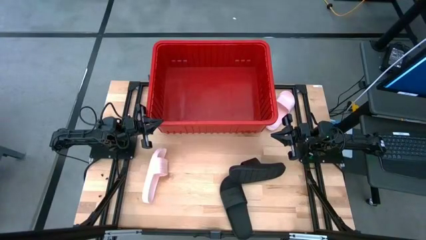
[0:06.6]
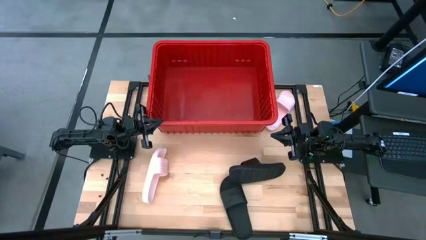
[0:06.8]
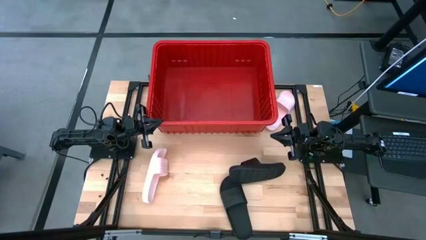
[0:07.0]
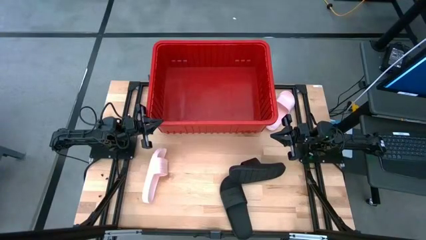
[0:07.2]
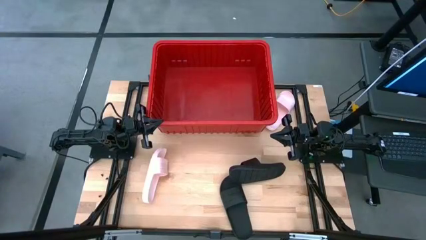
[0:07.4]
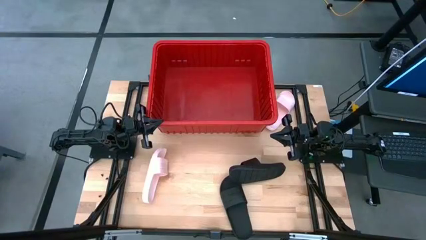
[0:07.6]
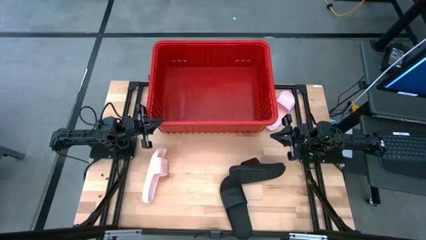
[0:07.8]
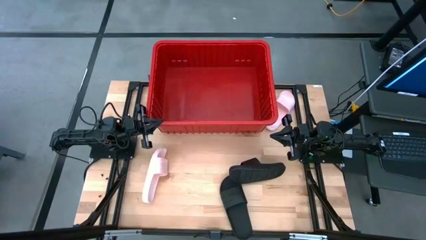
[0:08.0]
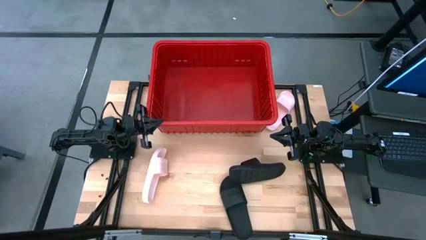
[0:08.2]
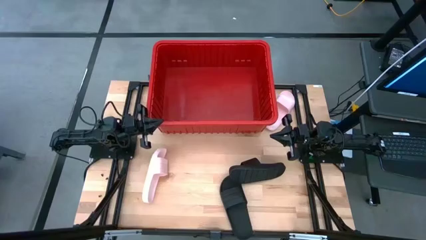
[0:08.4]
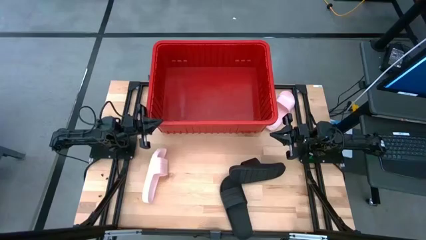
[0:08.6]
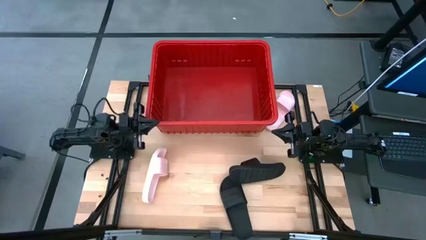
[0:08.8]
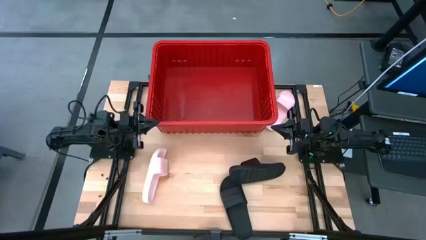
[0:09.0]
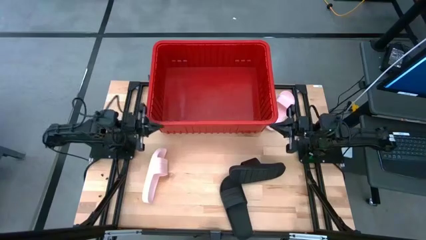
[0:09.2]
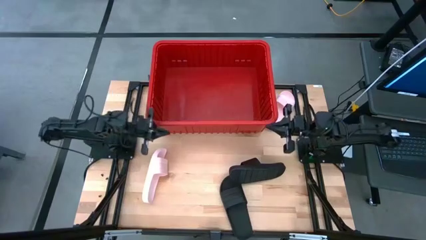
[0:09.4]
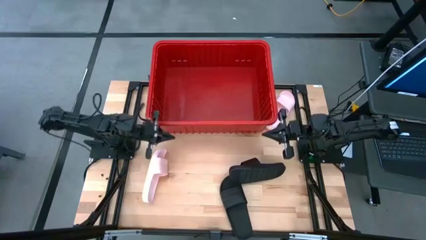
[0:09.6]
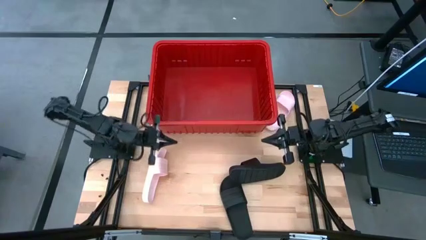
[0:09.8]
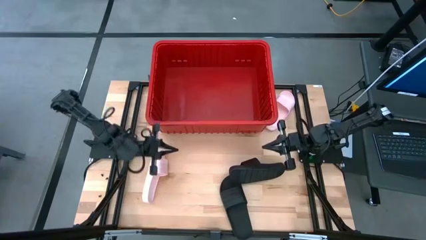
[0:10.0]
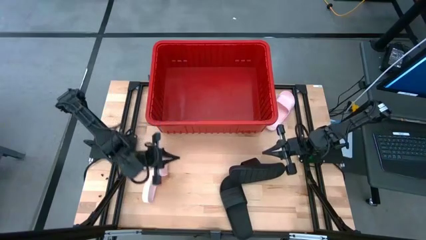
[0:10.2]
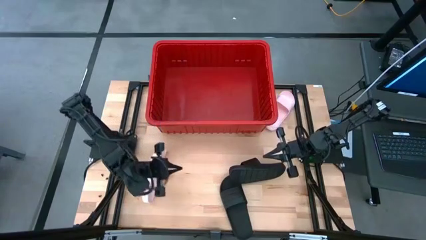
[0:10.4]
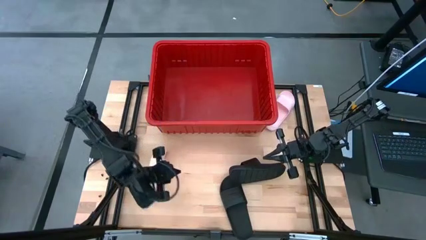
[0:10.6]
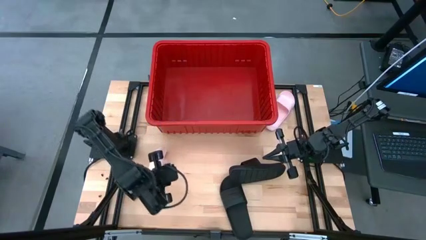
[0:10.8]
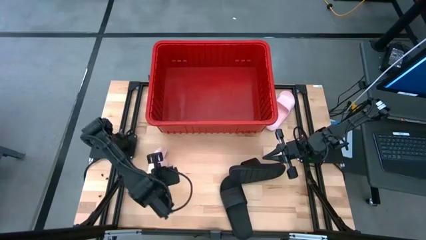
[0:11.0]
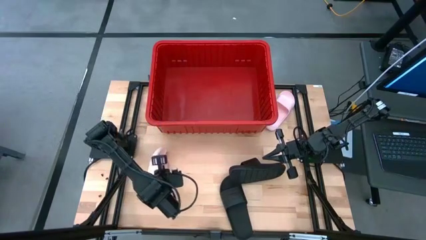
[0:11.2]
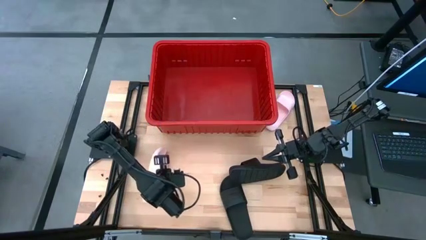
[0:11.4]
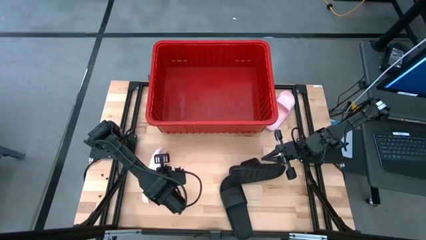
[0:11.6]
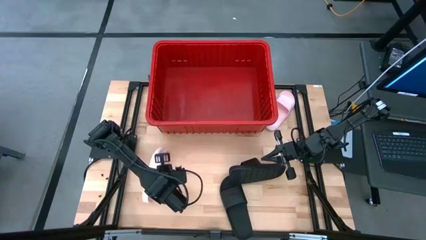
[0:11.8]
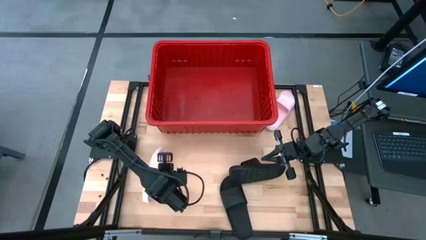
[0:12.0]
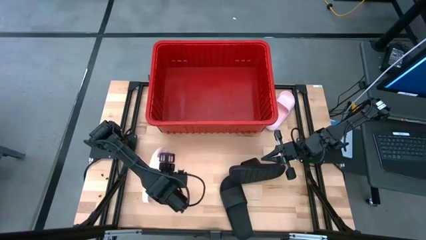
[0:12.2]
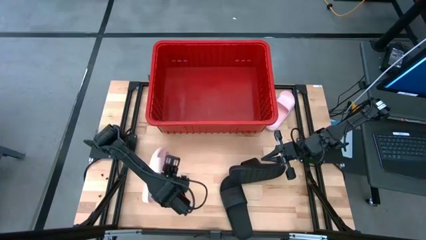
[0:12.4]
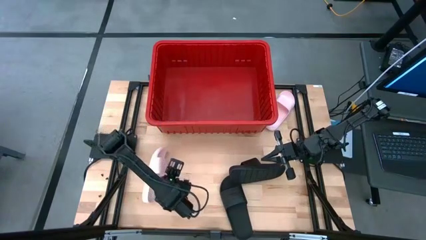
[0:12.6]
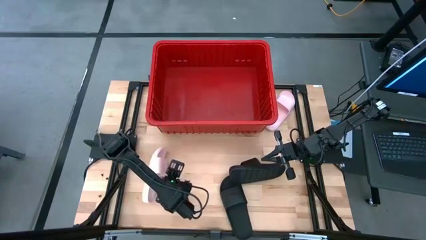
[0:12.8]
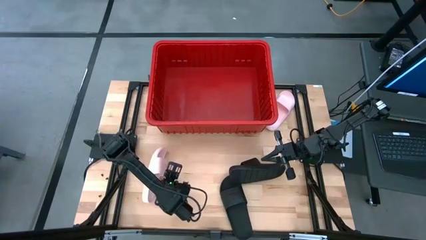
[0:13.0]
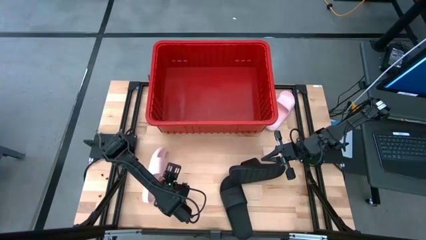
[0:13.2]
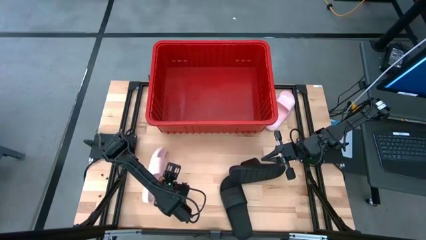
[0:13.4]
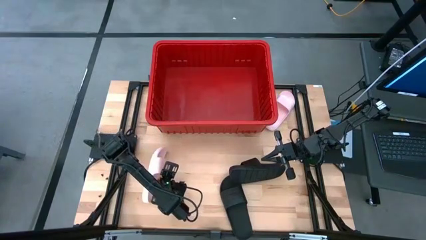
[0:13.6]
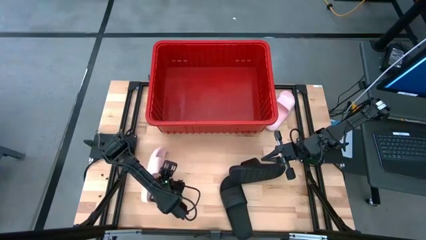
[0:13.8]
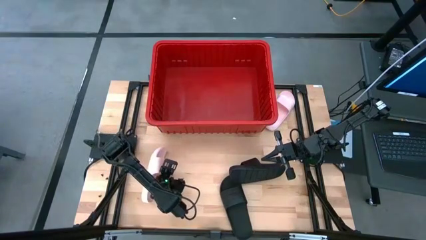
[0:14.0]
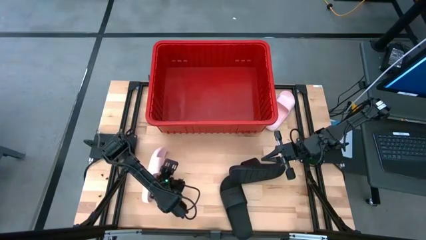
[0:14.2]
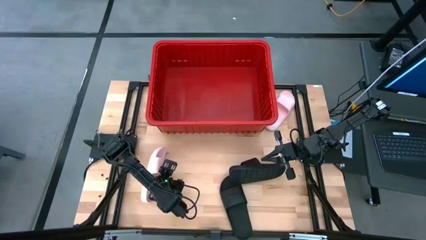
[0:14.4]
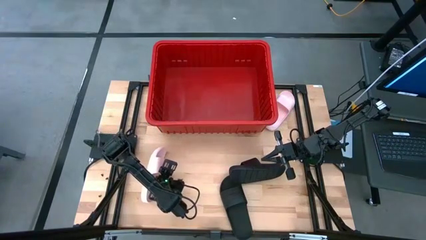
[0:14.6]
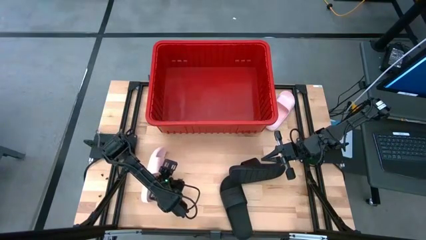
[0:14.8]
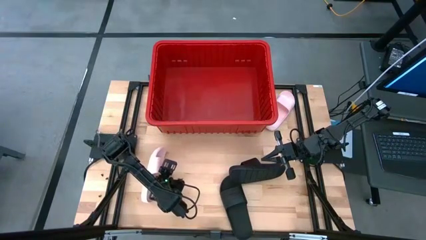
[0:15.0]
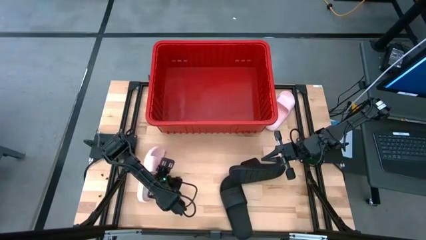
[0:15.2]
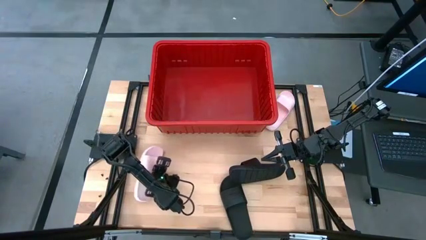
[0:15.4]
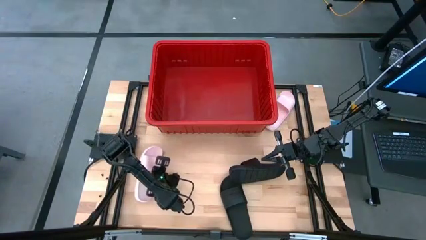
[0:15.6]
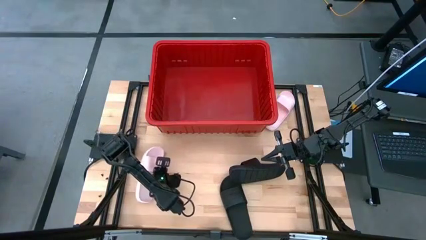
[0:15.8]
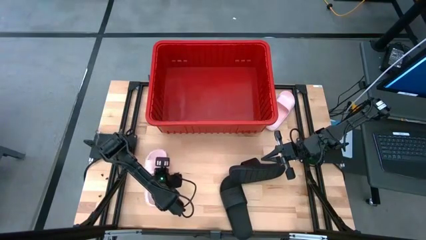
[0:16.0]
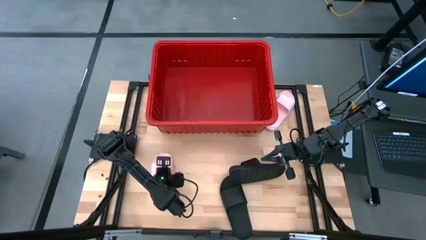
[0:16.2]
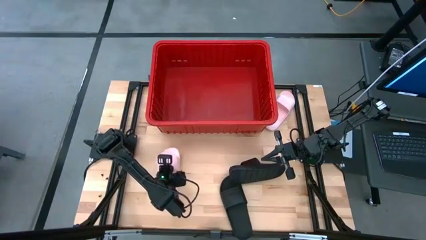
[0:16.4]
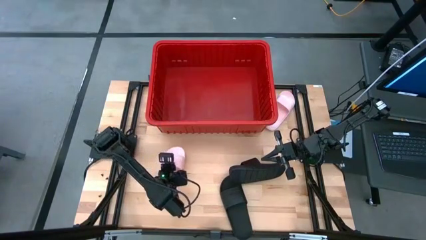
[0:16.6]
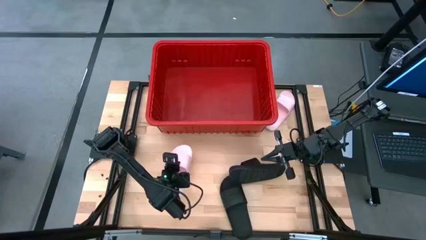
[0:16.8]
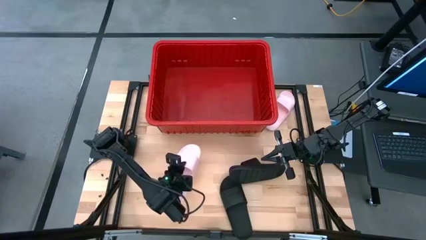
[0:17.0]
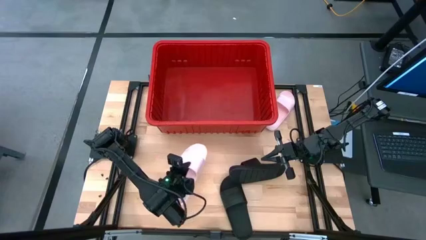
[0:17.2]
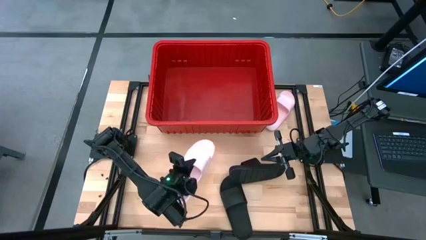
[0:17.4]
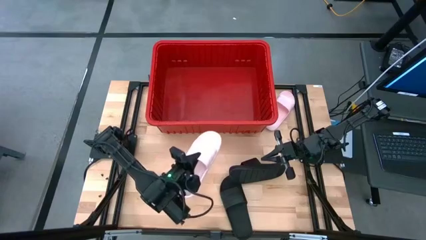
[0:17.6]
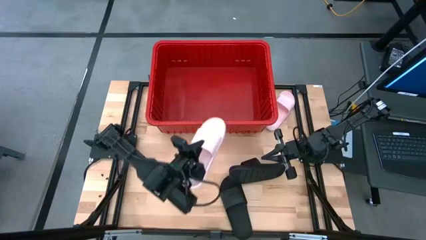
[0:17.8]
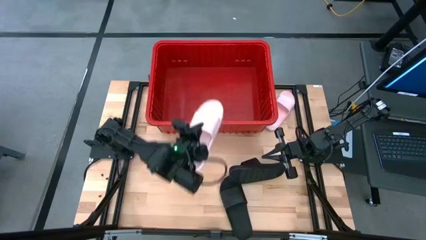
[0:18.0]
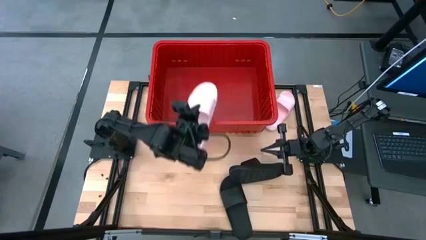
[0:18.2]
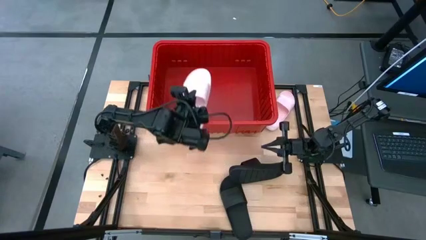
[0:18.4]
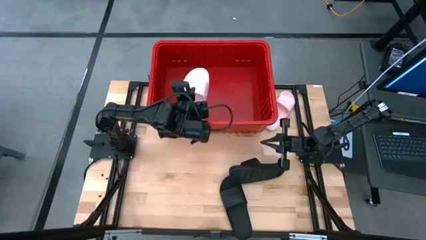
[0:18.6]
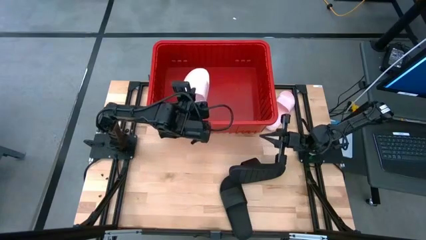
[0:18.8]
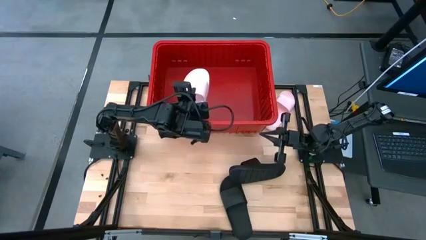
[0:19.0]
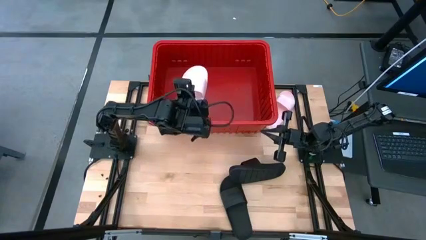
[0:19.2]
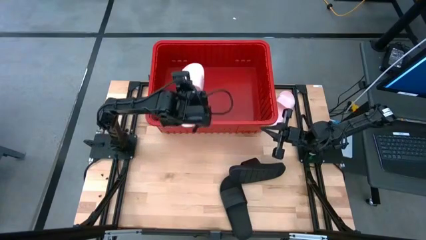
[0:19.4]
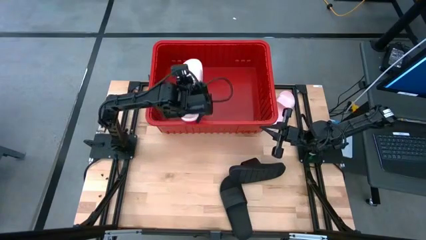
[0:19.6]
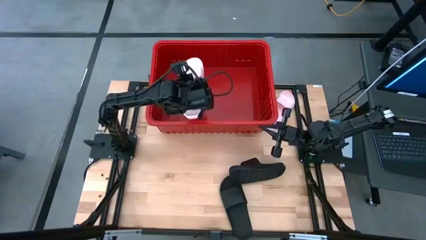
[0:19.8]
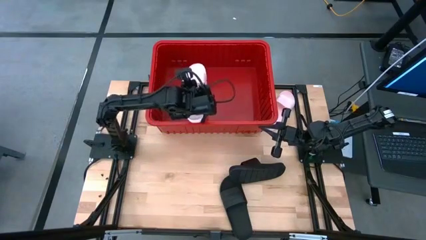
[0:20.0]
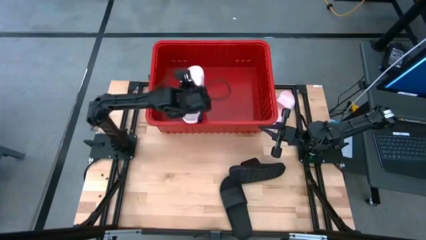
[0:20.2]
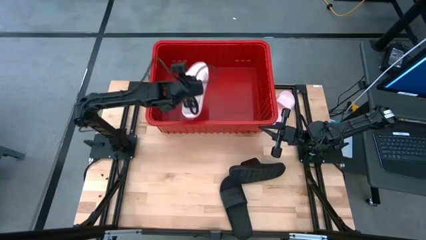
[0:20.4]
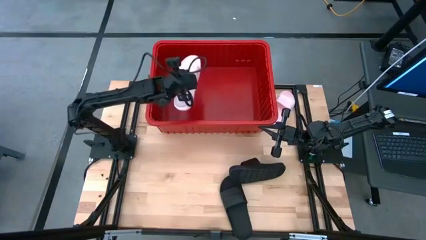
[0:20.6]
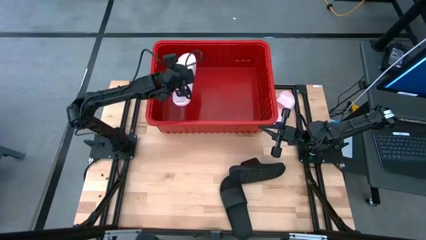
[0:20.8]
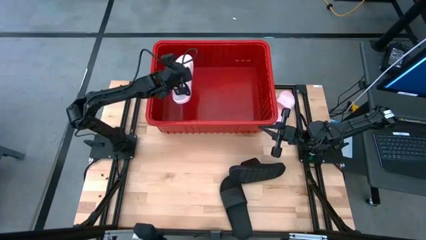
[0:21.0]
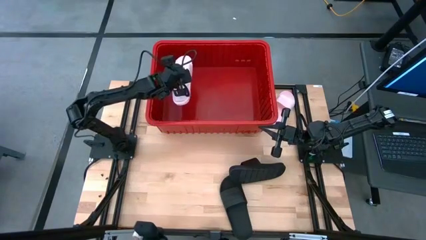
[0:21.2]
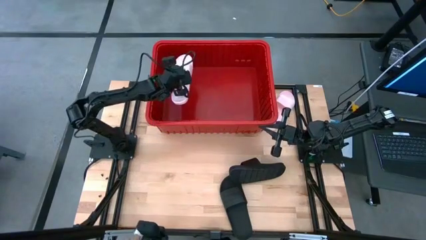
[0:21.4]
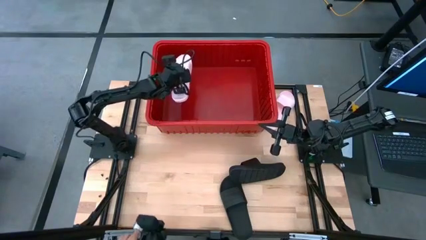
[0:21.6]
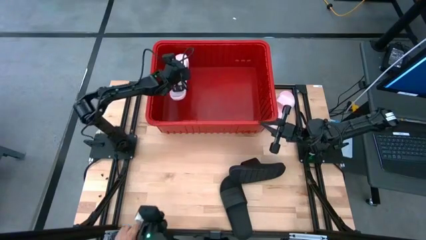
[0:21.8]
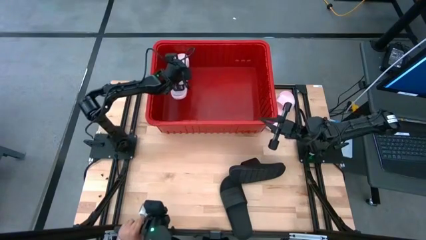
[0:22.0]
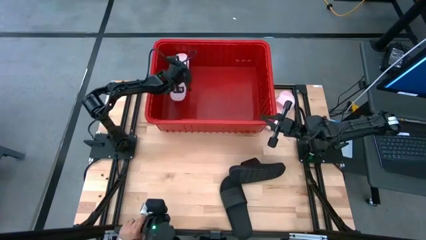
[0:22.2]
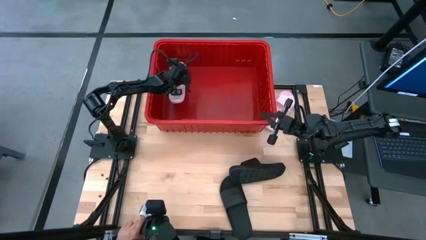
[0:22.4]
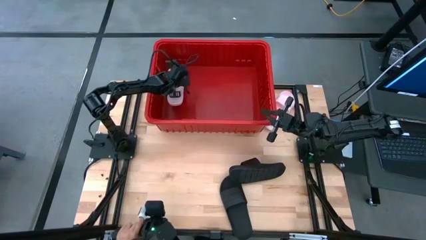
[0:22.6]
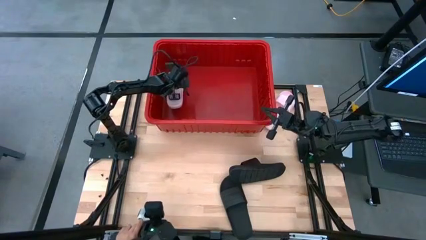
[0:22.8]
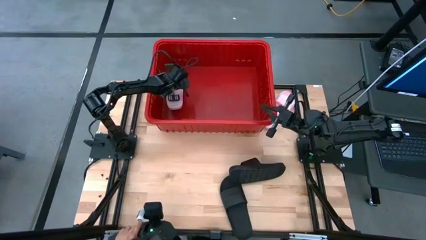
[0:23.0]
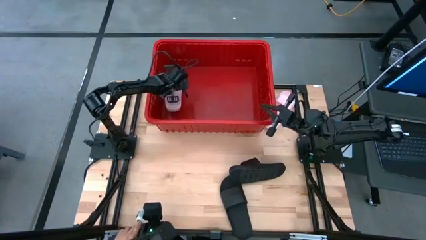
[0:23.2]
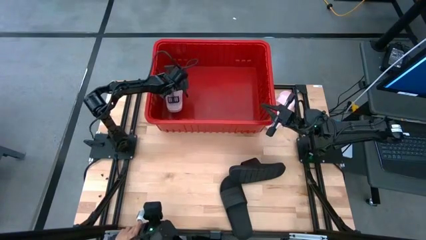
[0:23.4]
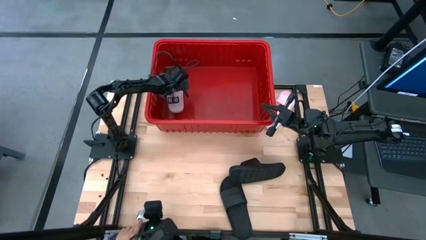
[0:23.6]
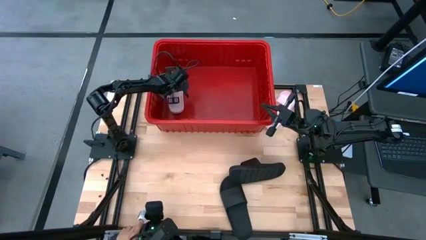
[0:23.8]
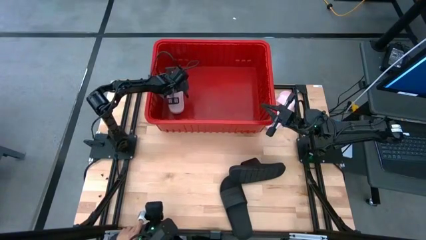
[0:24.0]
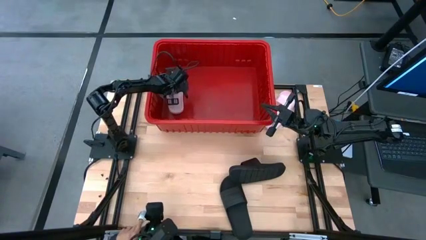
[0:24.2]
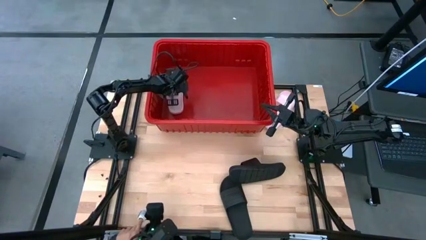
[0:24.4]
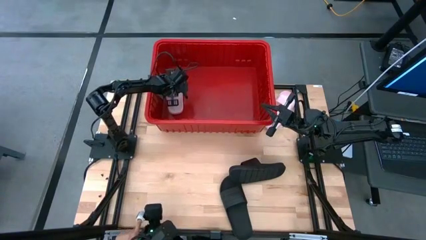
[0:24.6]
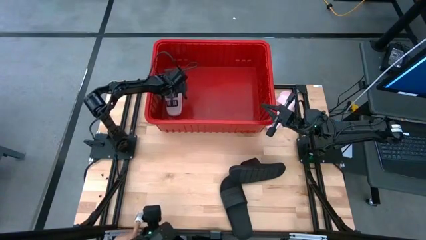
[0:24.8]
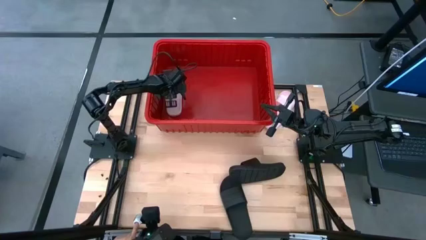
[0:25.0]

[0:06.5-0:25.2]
Task: Pick and place slides into bin
Put the bottom pink slides into the red bin
